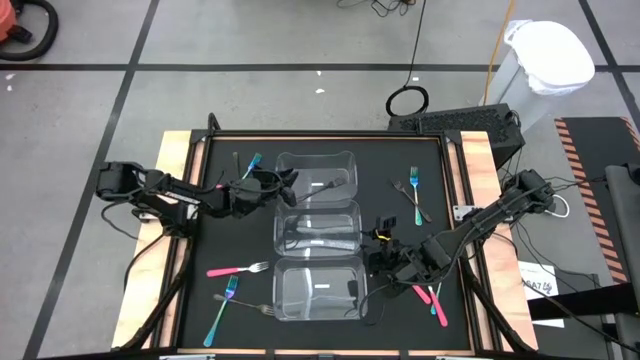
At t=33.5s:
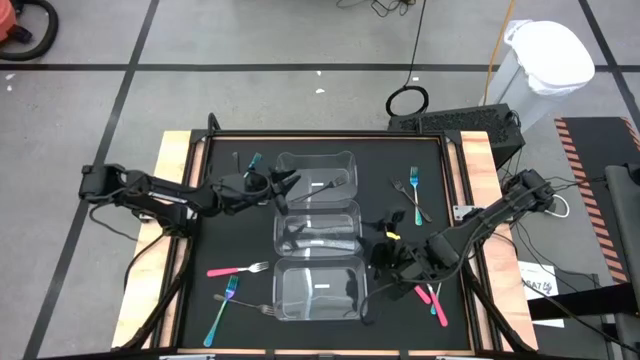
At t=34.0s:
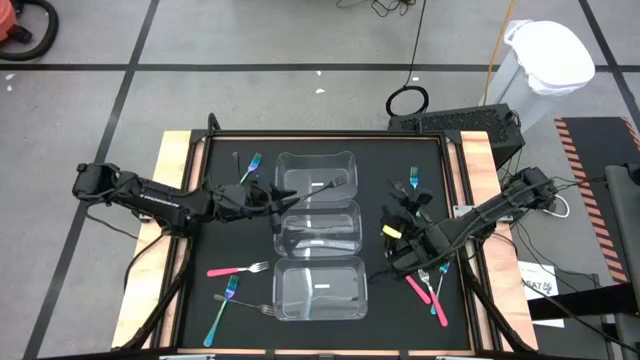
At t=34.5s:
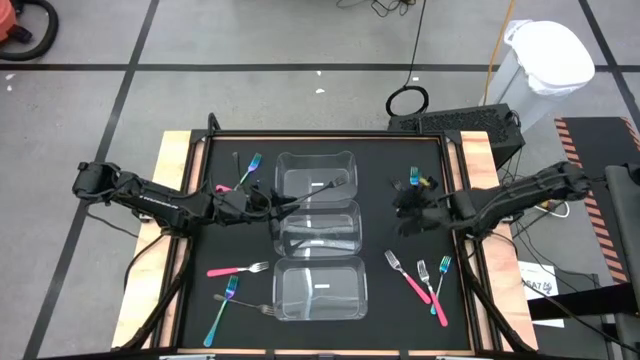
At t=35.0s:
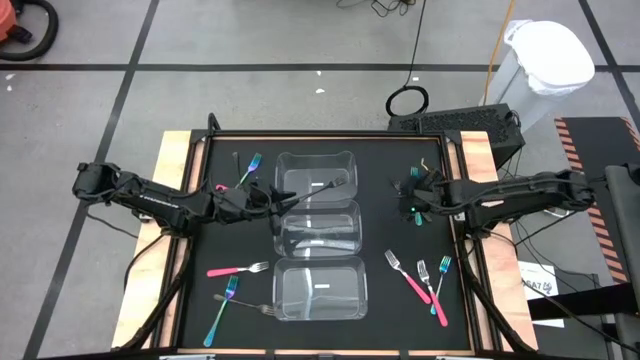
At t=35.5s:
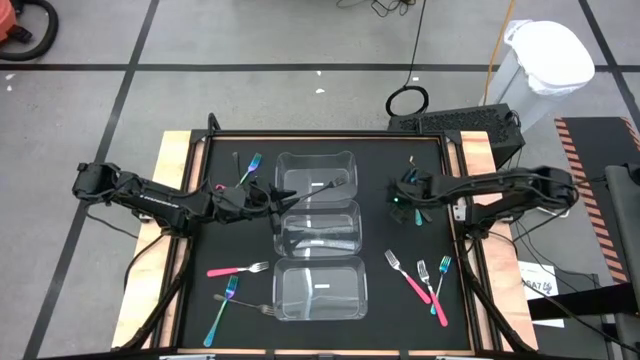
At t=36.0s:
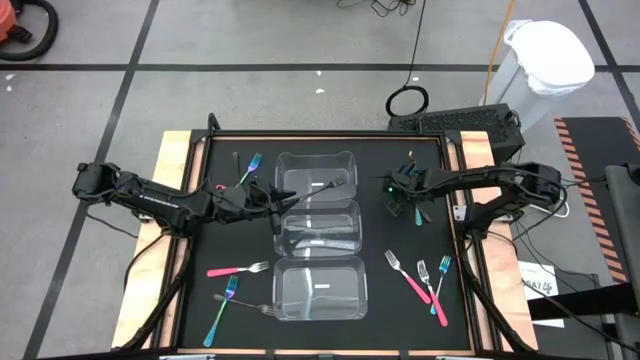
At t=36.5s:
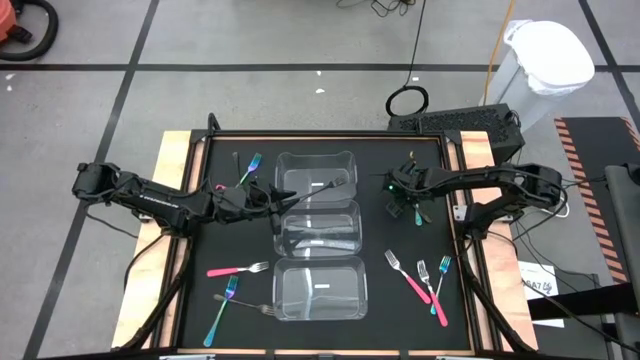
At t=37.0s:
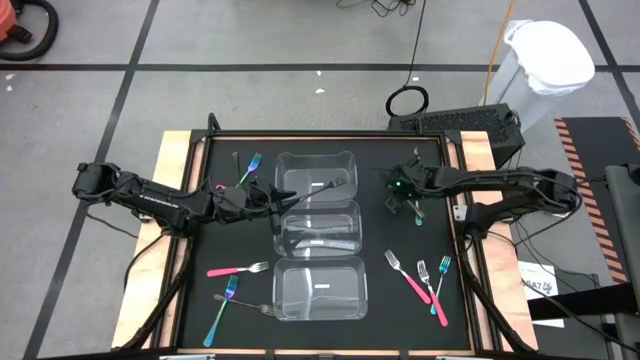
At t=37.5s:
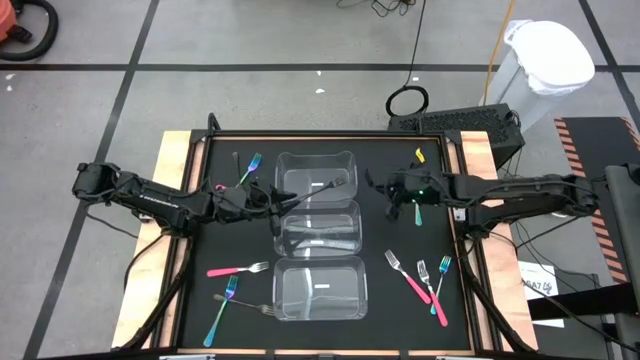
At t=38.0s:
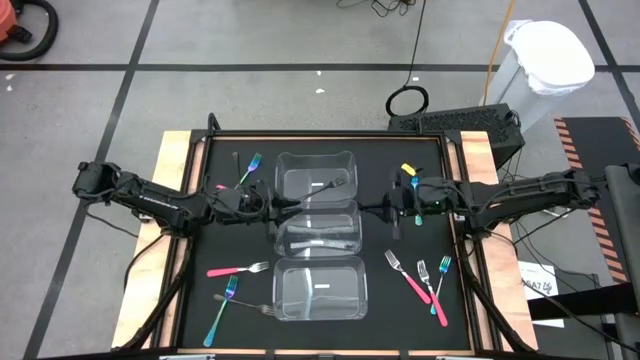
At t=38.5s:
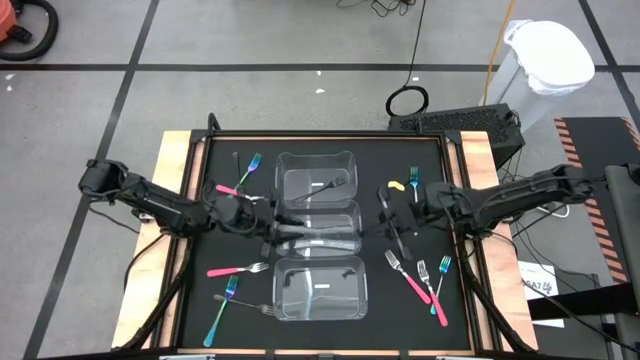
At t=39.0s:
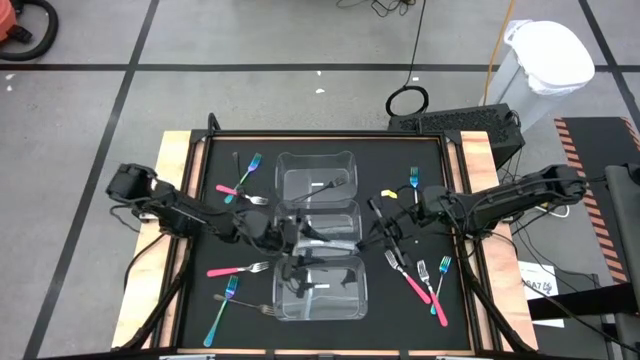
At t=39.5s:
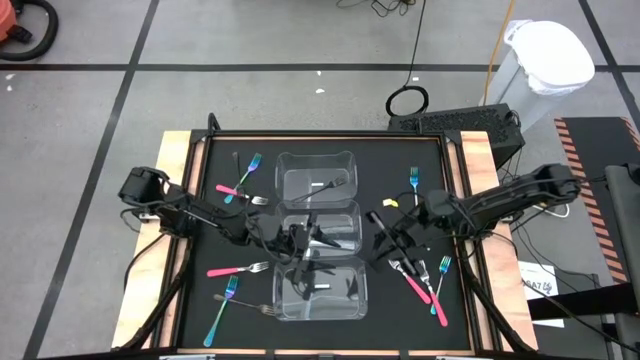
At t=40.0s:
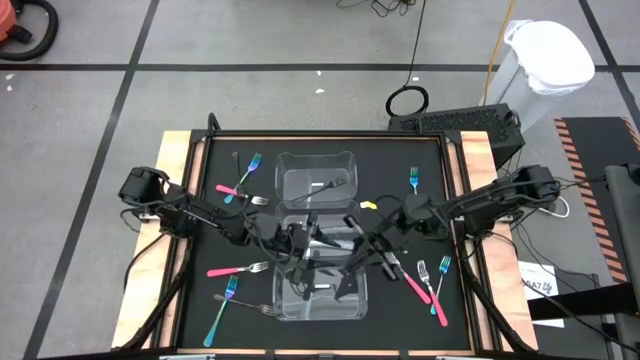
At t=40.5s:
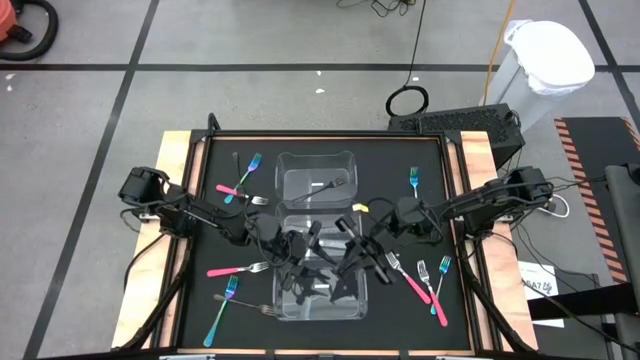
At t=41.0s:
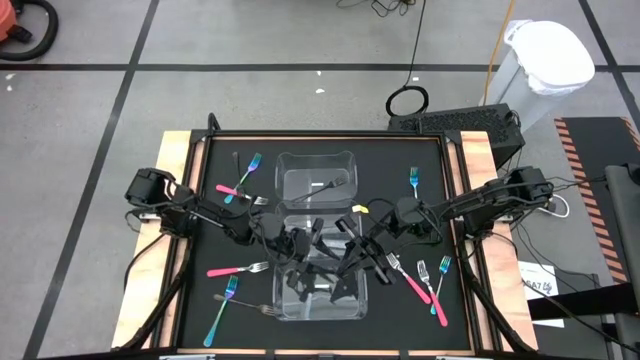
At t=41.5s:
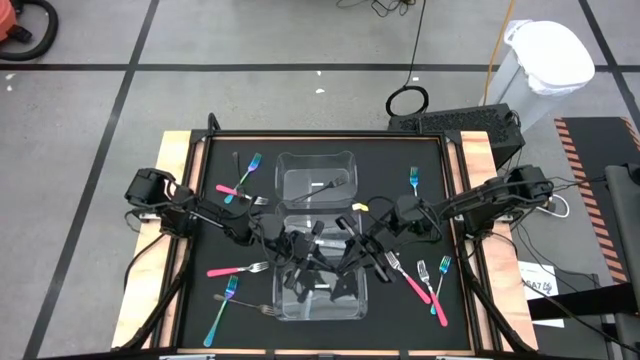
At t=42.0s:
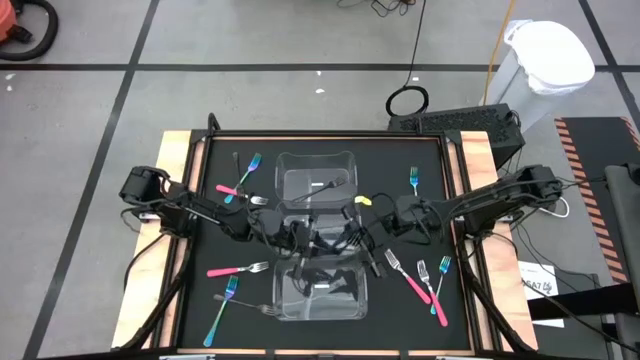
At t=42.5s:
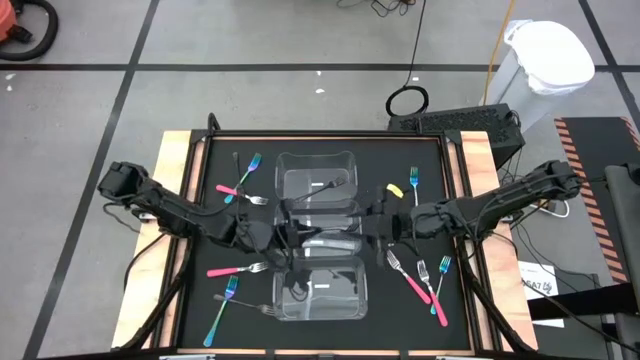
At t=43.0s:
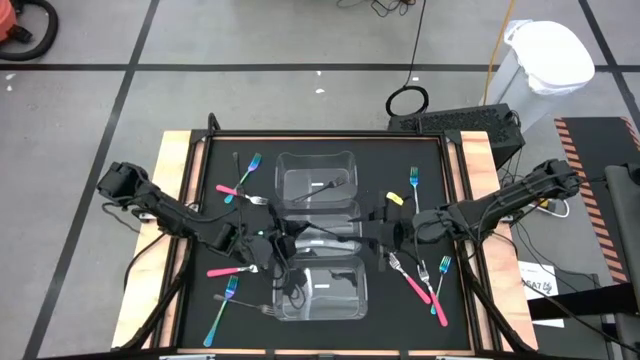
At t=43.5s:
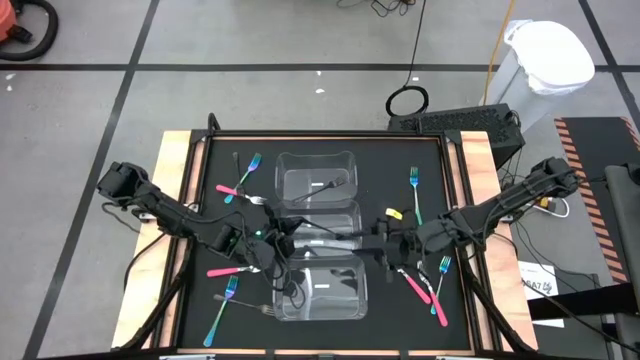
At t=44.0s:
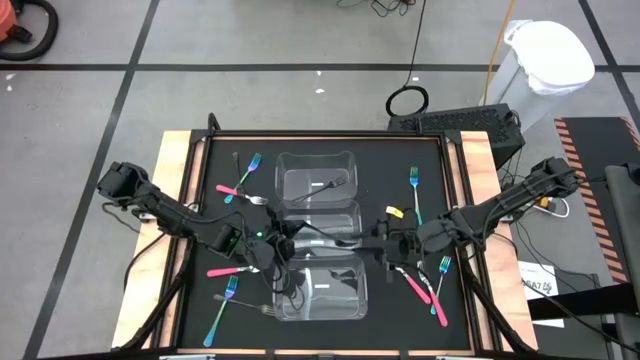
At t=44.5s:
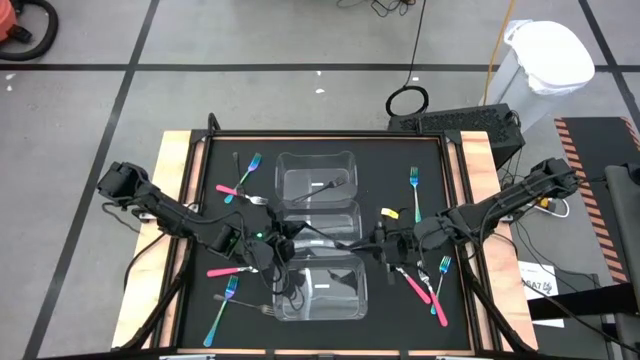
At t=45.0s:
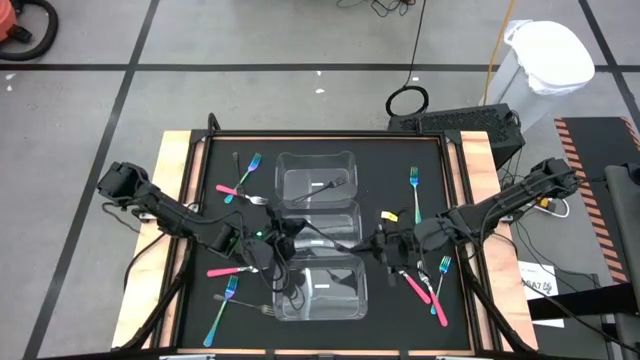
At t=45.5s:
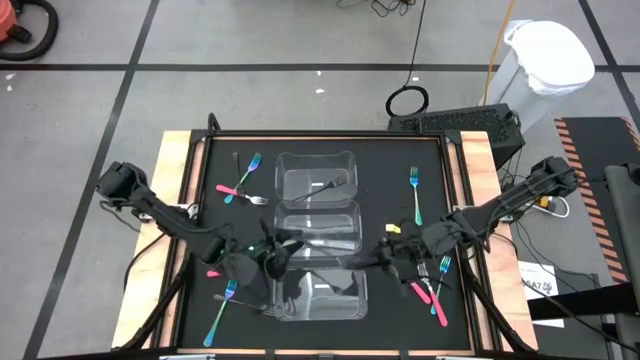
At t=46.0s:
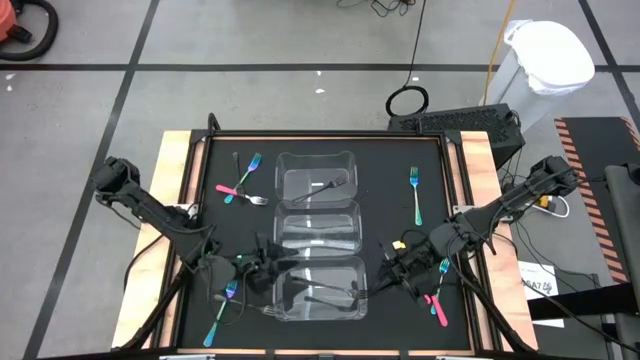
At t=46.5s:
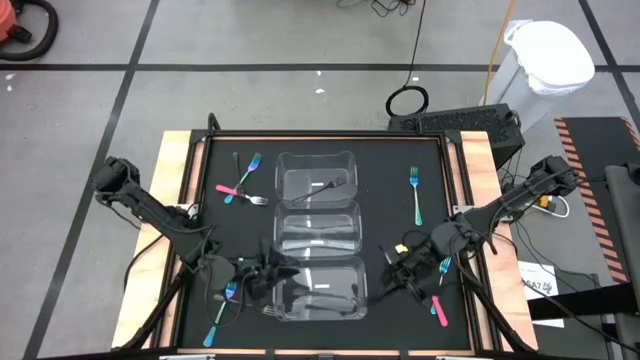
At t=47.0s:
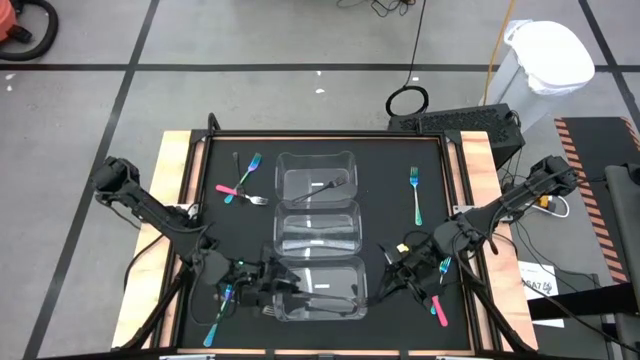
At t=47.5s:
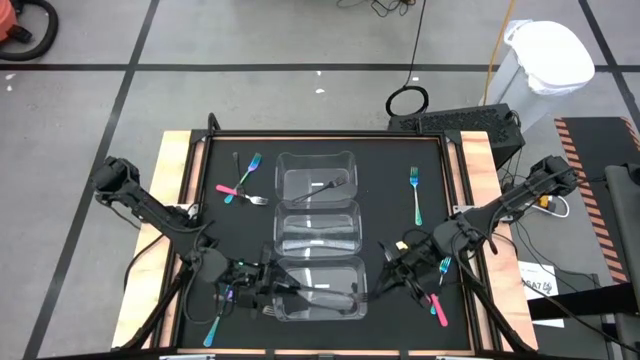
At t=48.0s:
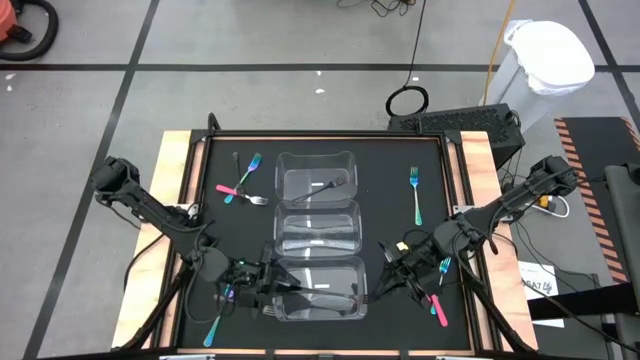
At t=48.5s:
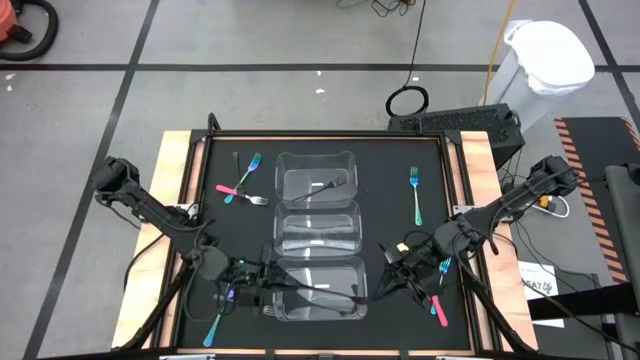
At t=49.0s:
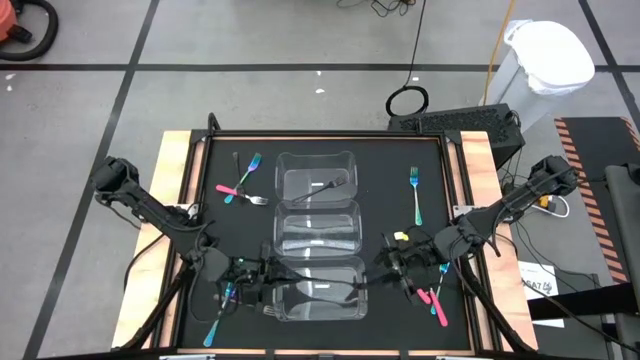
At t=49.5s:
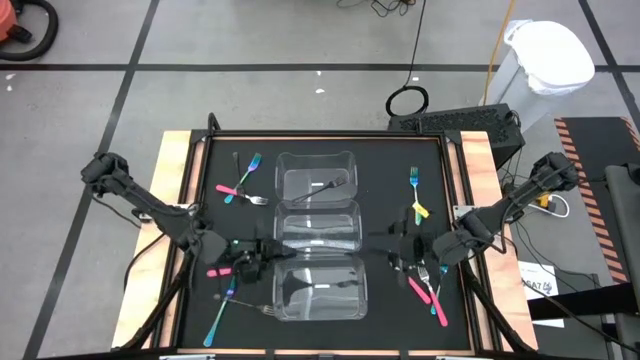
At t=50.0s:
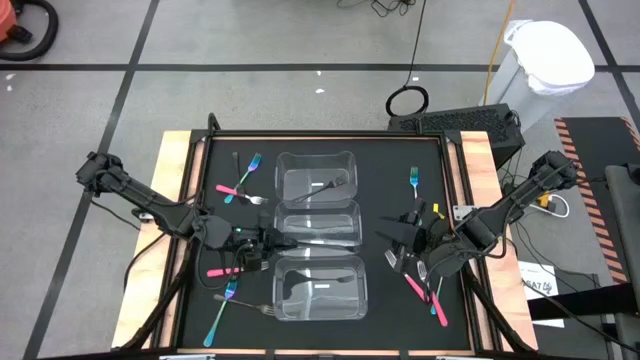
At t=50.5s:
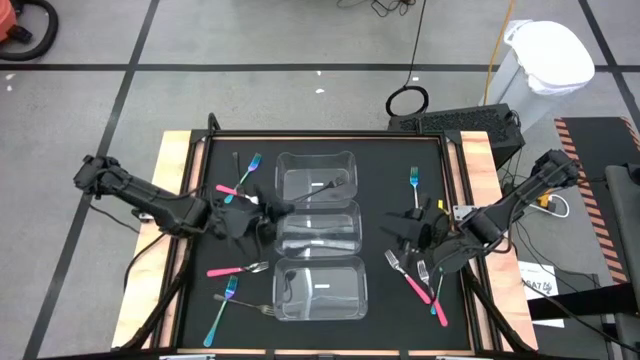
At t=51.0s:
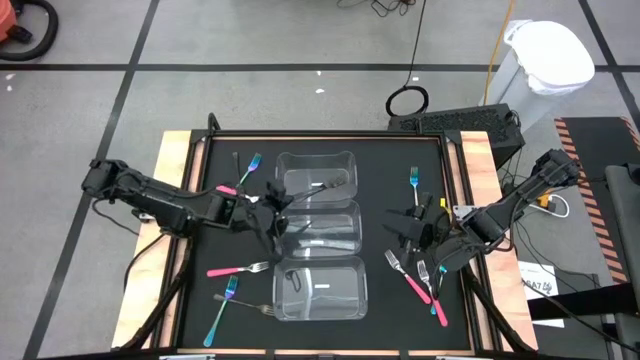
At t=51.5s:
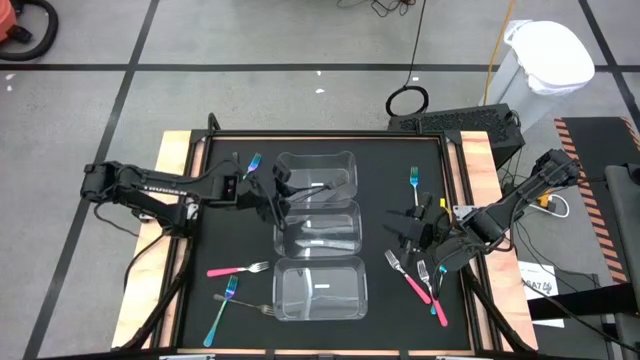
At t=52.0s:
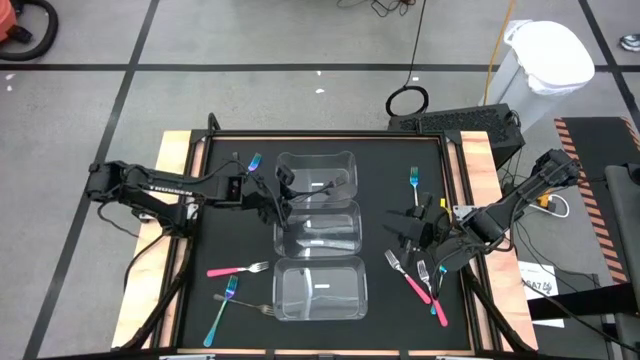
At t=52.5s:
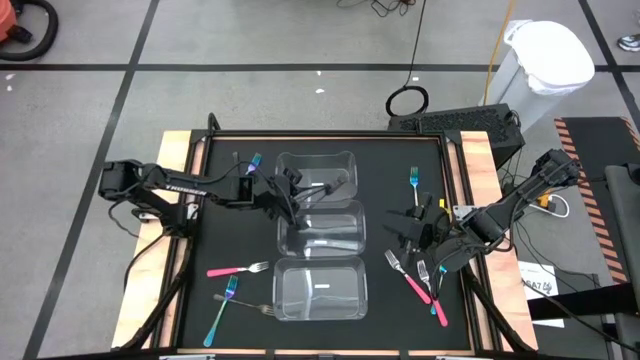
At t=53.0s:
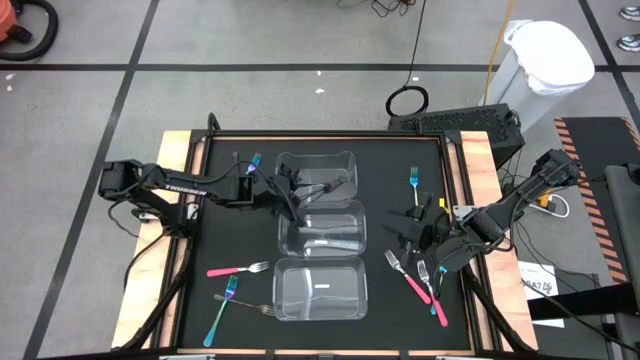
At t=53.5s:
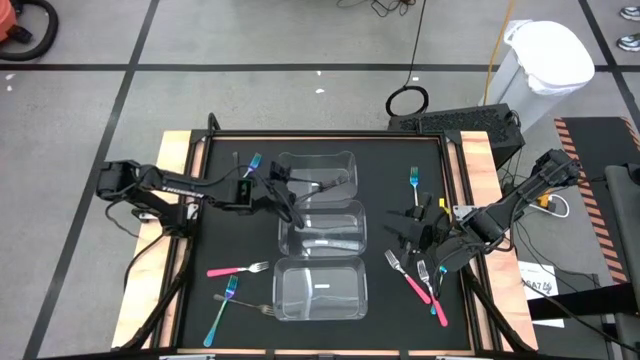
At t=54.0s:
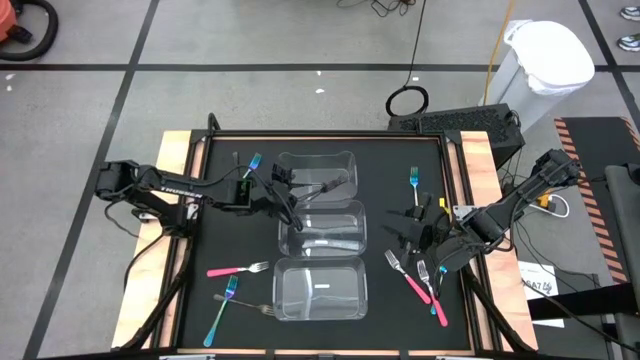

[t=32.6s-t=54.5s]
Task: Sort silverware by color (type)
Put the top right black fork into the top transparent bin

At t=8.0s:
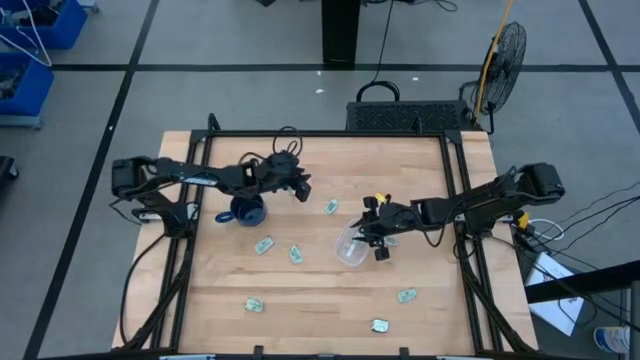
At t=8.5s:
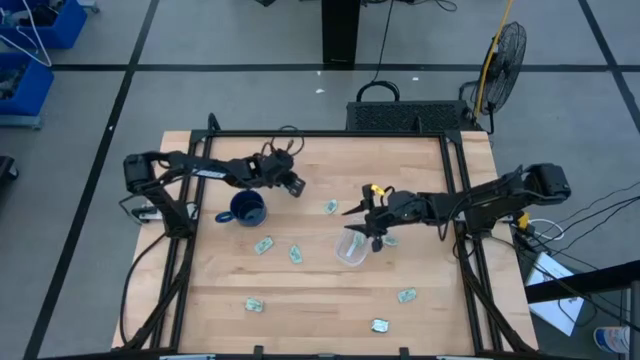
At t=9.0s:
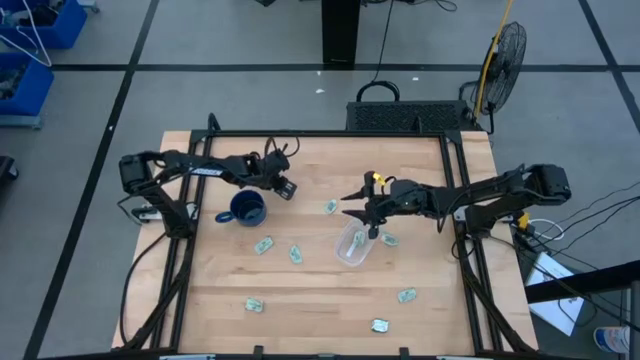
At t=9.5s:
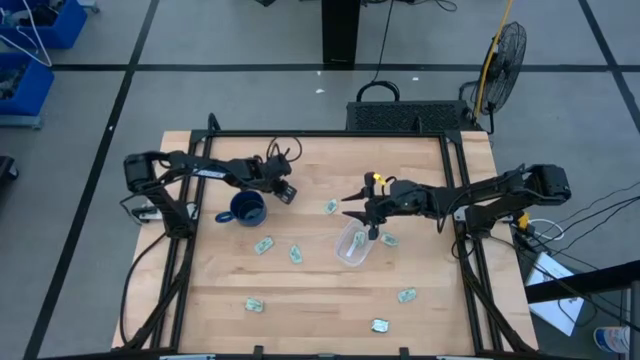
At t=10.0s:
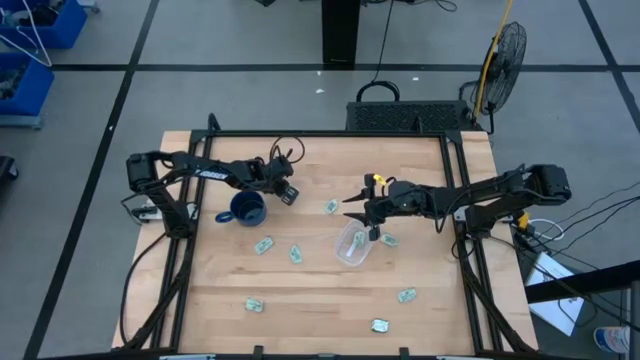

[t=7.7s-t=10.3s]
Task: Pick and place Stevia / Truvia into bins
Put the stevia packet into the transparent container
